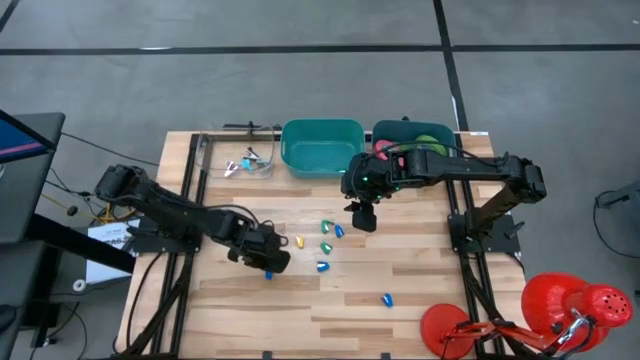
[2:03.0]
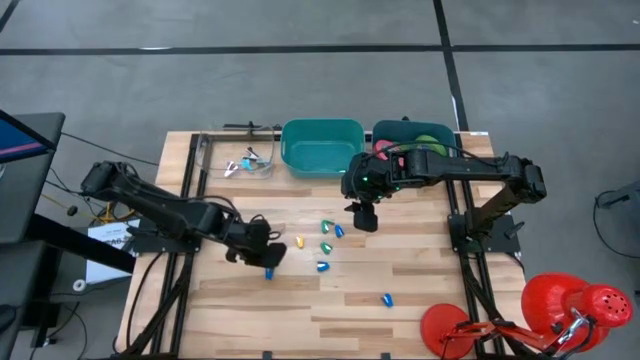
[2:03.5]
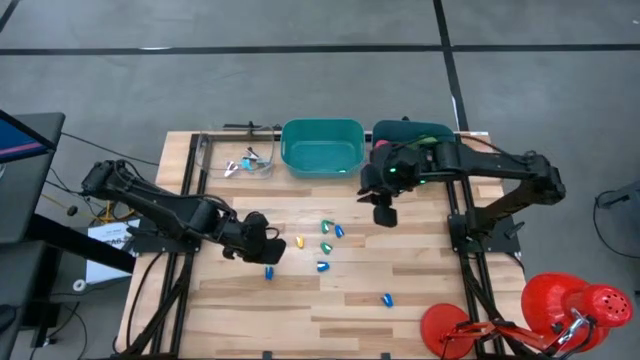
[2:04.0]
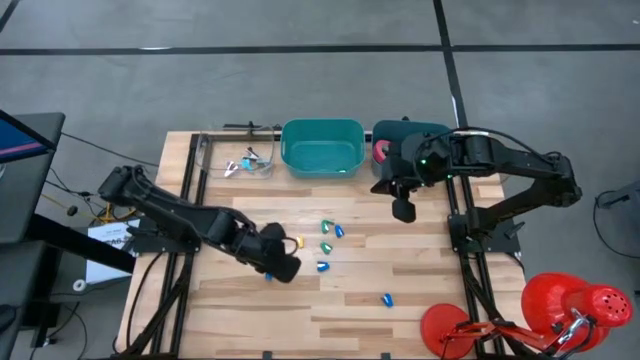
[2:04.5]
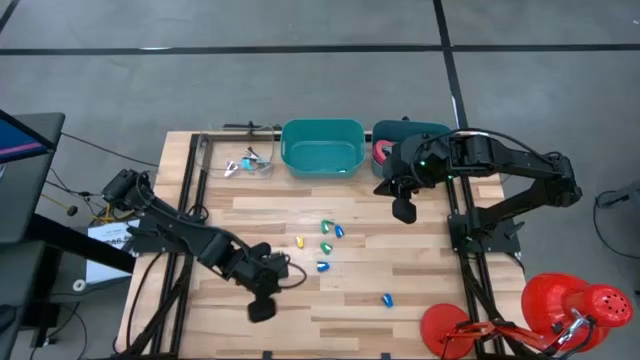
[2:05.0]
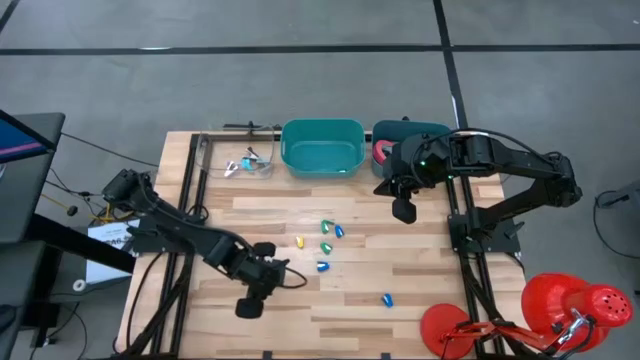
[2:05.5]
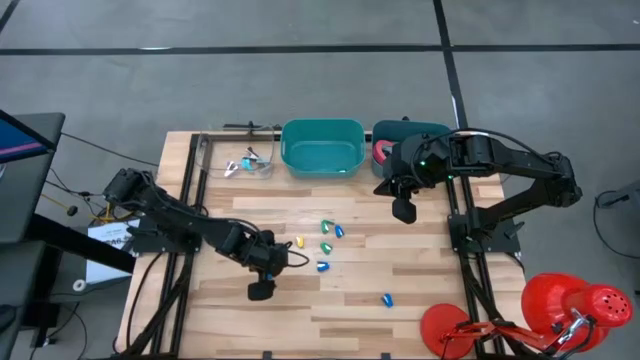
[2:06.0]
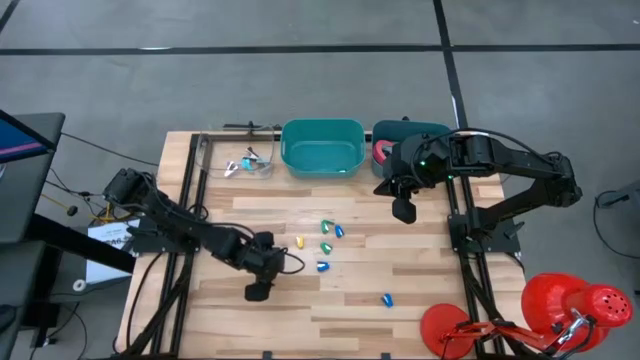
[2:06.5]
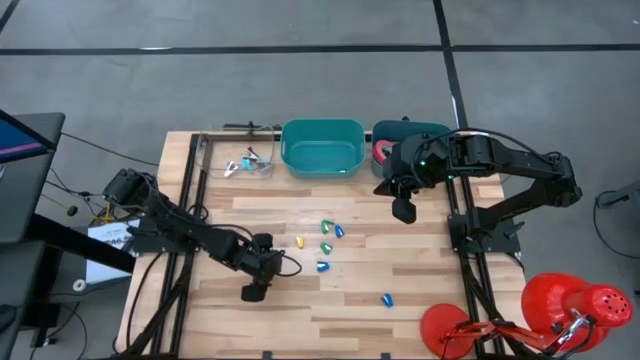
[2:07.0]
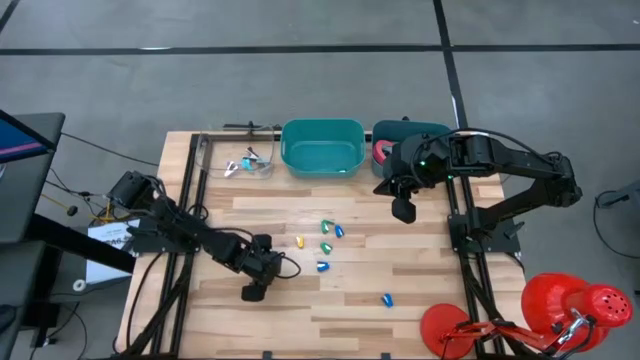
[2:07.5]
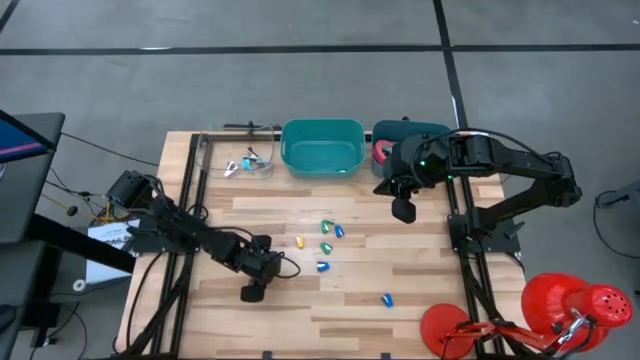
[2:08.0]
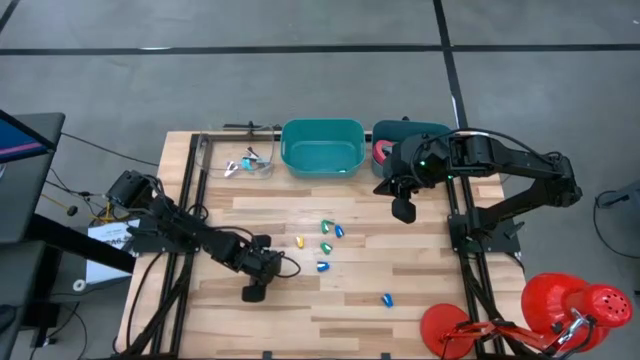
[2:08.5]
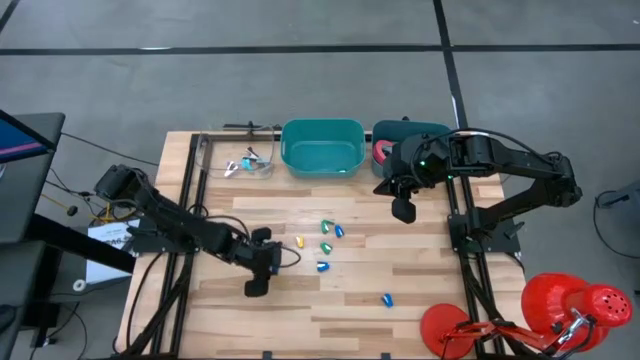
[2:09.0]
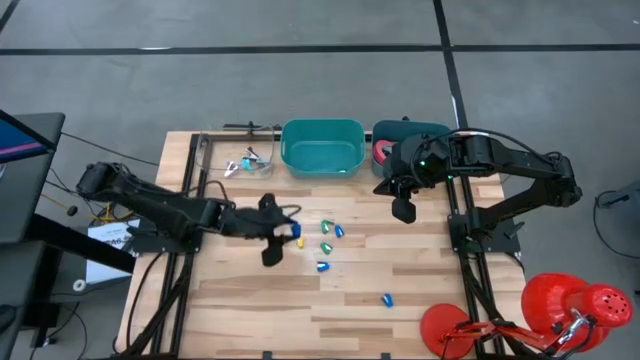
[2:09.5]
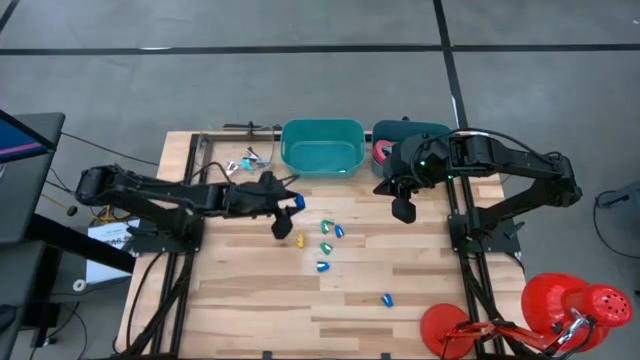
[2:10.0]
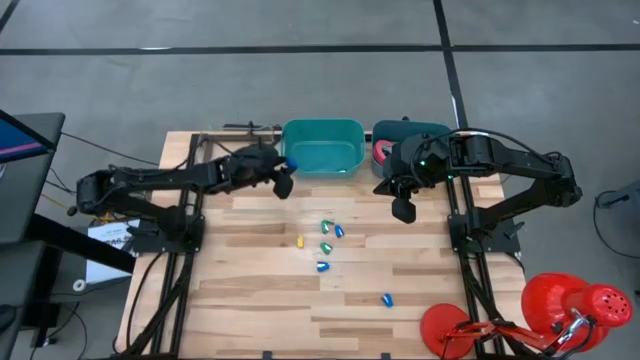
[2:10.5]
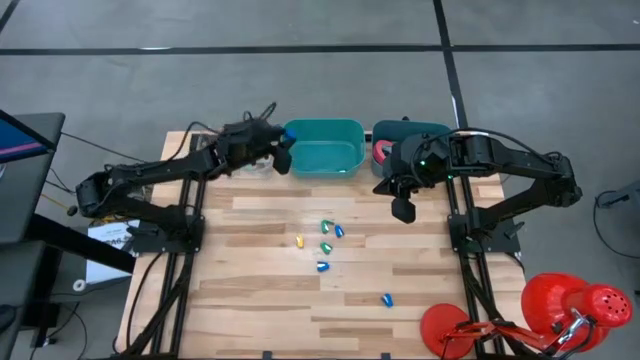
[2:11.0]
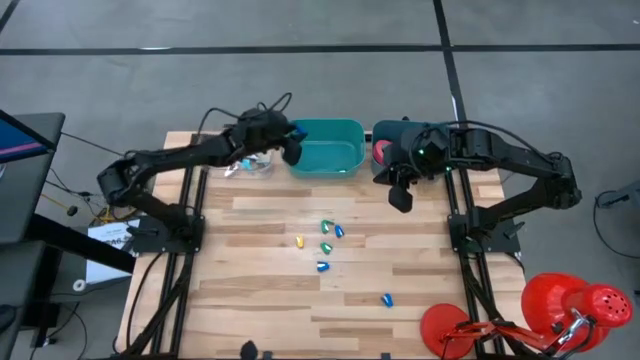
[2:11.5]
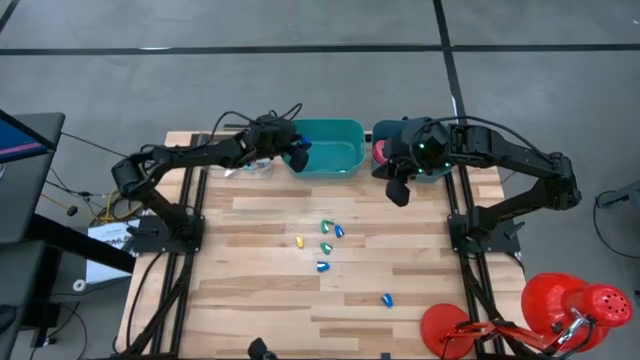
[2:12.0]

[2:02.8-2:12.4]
Task: Pick and place Stapler, Stapler remover, tape
Put the blue stapler into the green bin

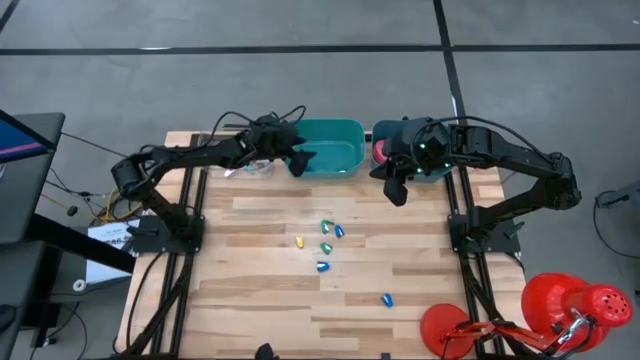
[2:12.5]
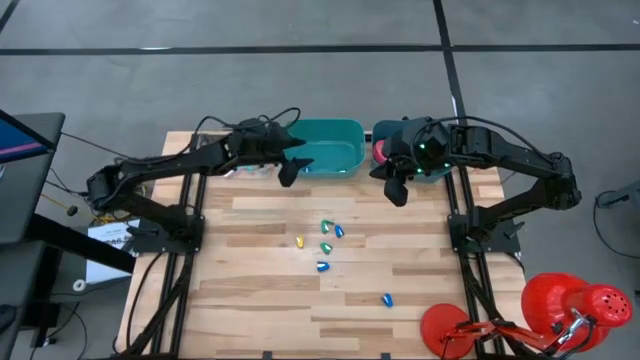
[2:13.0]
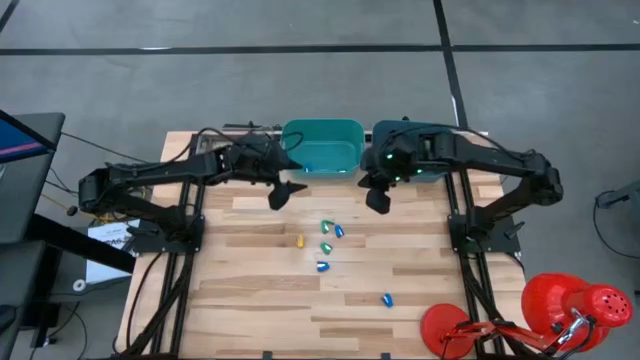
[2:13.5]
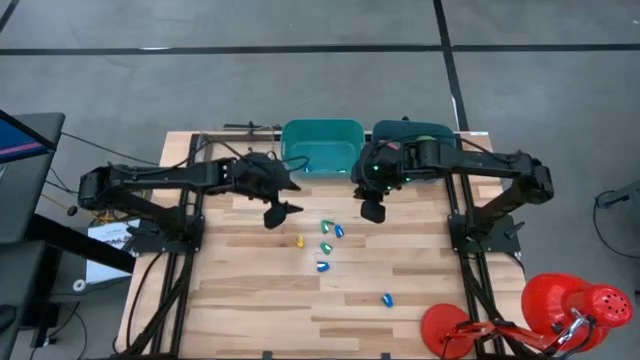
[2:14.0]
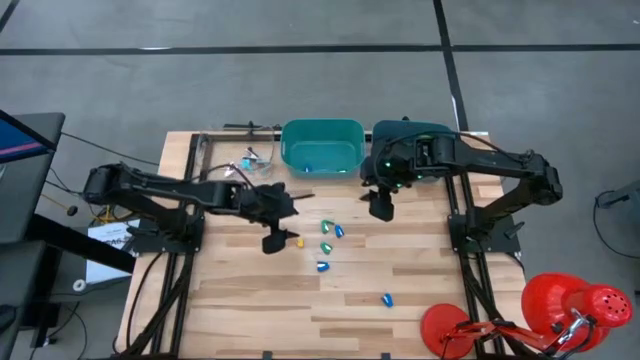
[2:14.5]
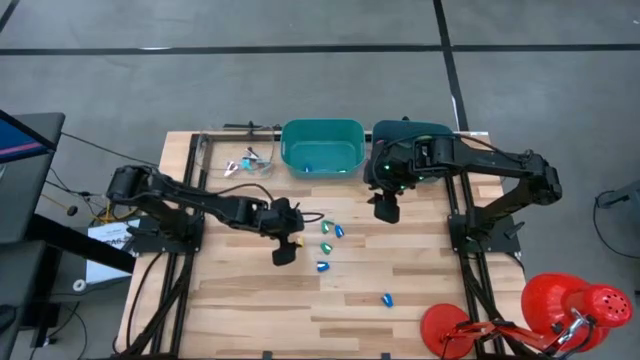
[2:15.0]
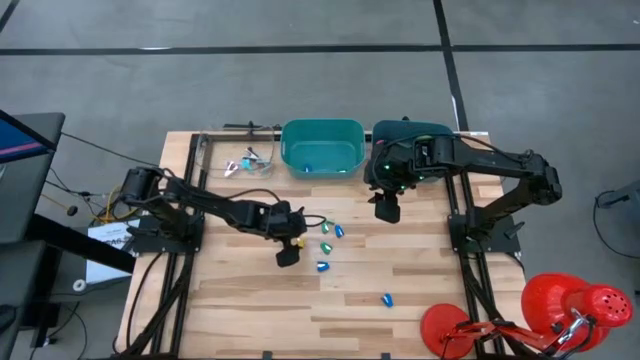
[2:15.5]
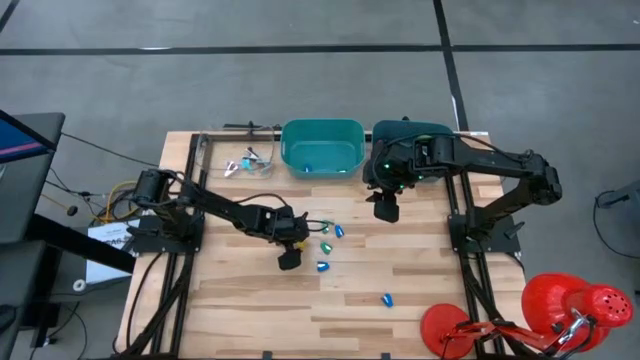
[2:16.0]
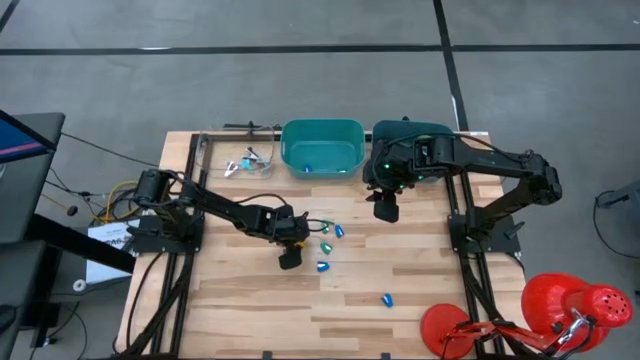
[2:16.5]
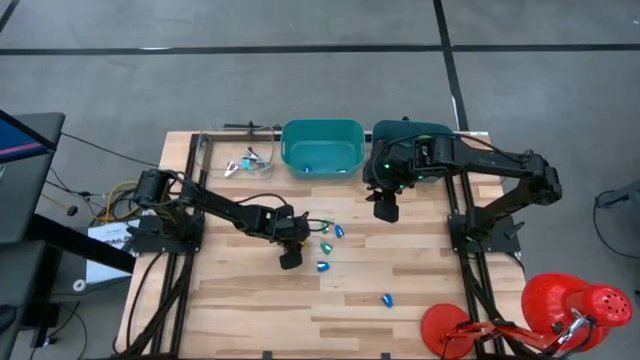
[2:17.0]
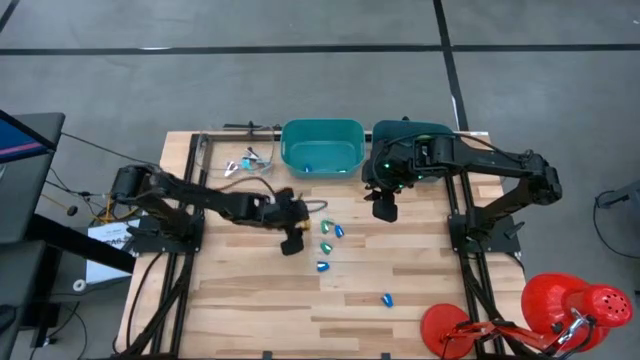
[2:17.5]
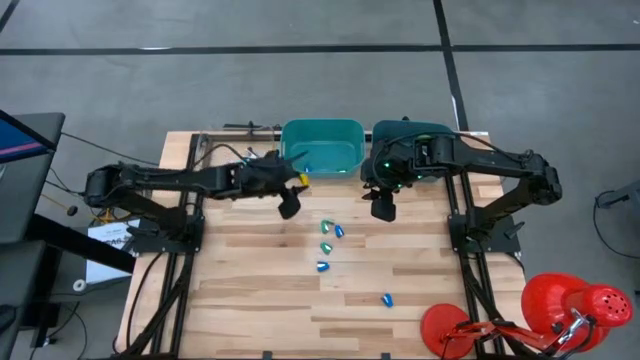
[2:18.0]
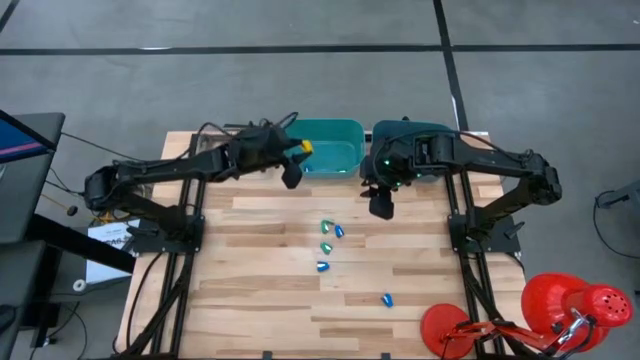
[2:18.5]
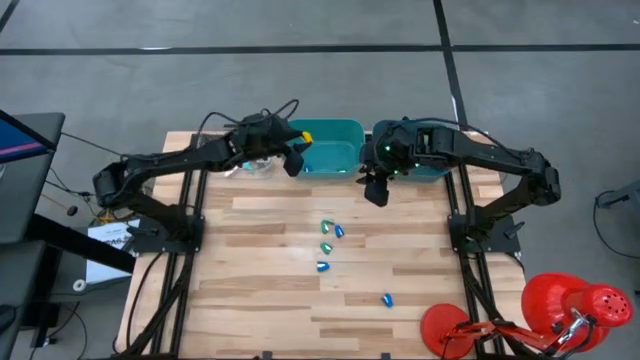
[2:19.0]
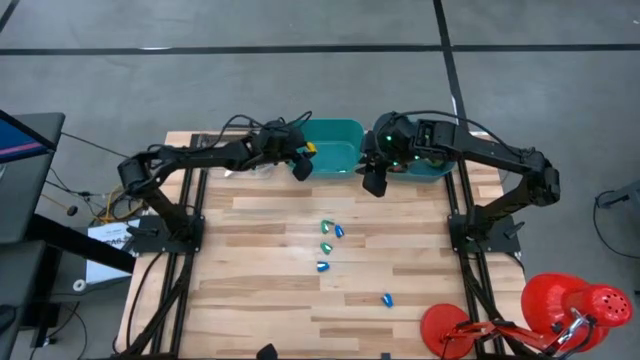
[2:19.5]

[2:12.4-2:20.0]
Put the yellow stapler into the green bin
